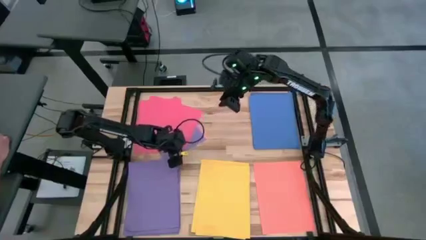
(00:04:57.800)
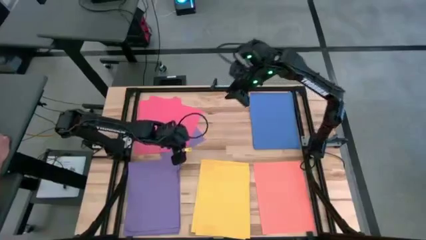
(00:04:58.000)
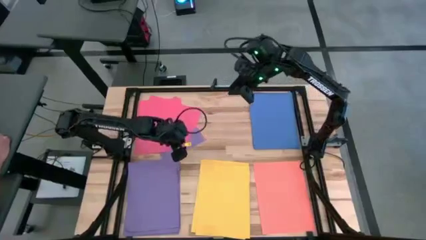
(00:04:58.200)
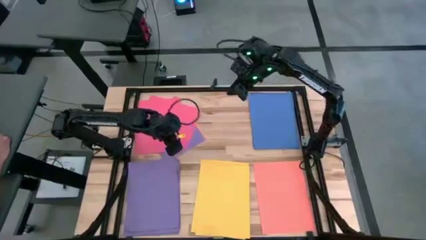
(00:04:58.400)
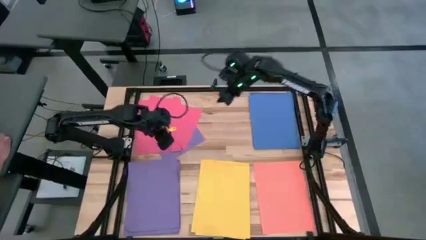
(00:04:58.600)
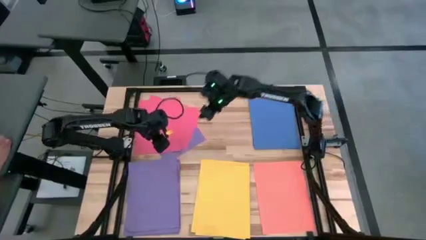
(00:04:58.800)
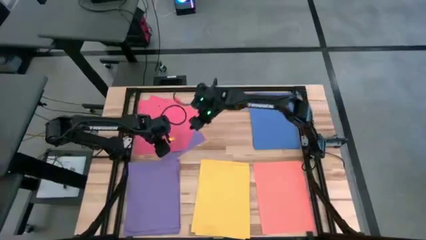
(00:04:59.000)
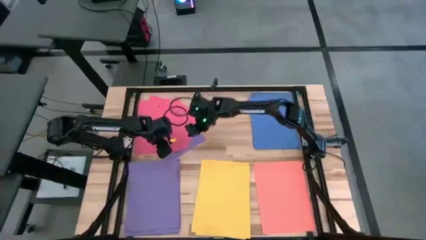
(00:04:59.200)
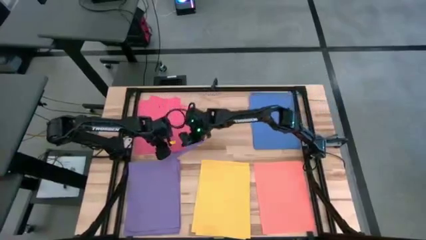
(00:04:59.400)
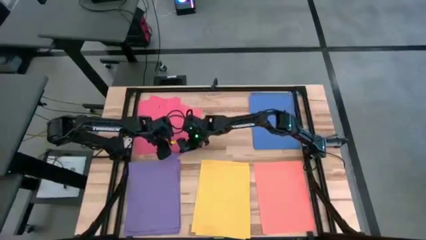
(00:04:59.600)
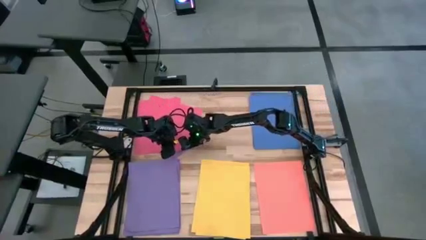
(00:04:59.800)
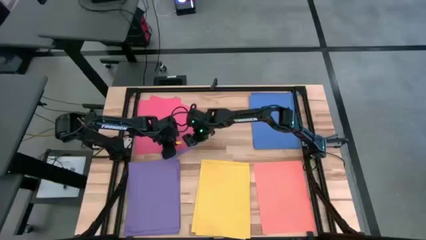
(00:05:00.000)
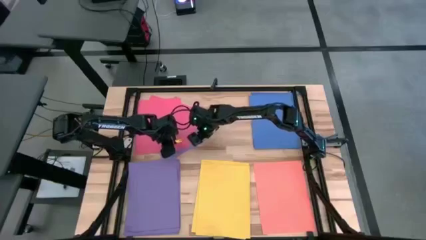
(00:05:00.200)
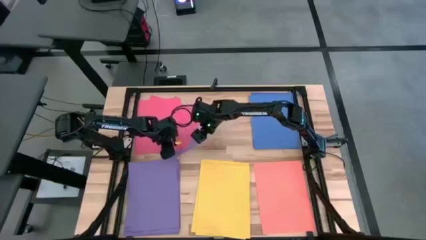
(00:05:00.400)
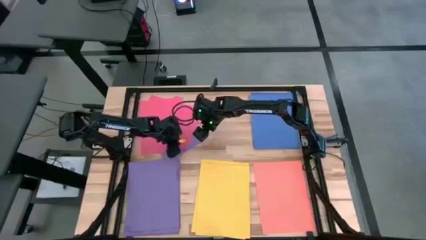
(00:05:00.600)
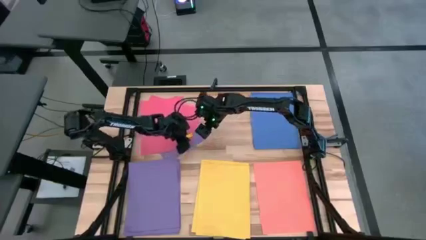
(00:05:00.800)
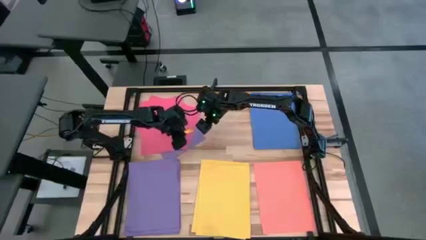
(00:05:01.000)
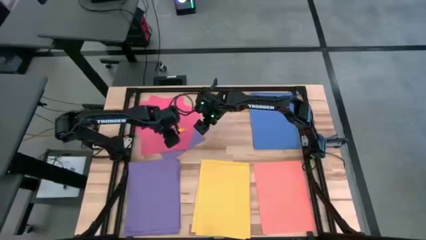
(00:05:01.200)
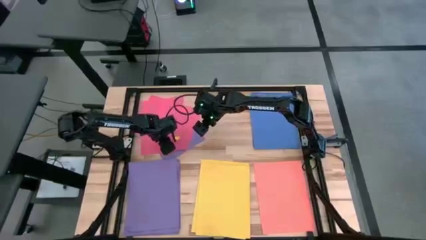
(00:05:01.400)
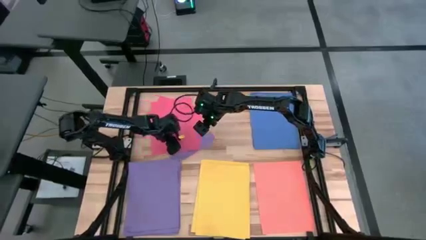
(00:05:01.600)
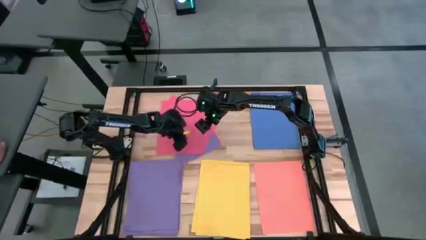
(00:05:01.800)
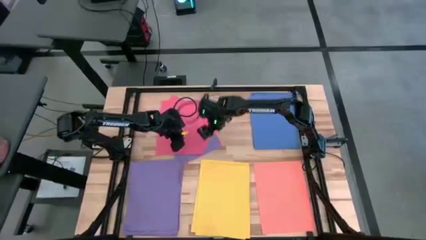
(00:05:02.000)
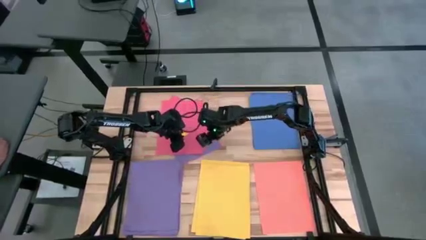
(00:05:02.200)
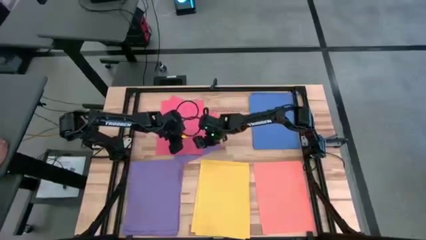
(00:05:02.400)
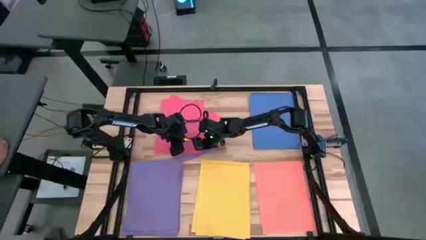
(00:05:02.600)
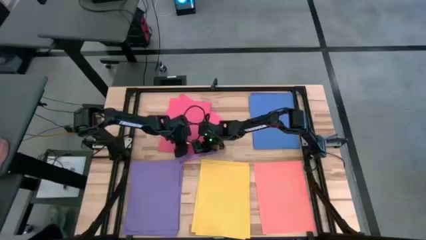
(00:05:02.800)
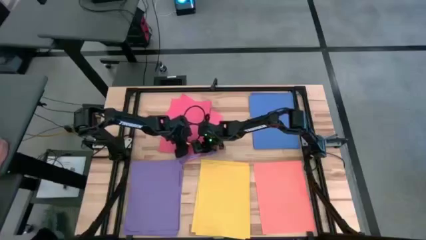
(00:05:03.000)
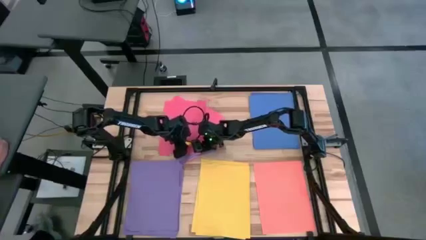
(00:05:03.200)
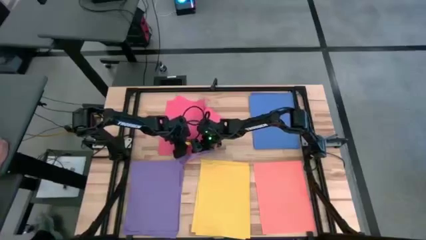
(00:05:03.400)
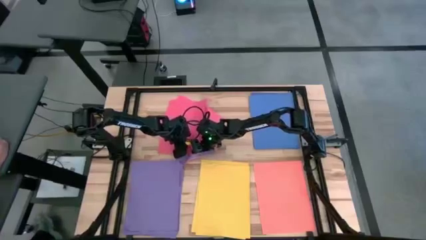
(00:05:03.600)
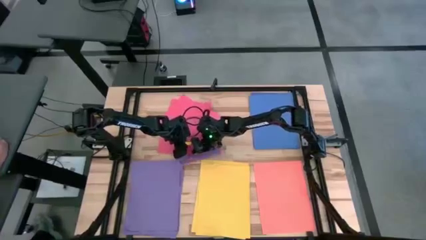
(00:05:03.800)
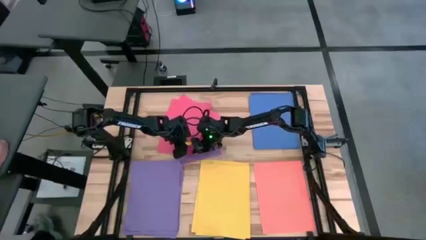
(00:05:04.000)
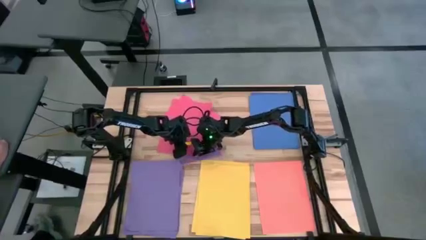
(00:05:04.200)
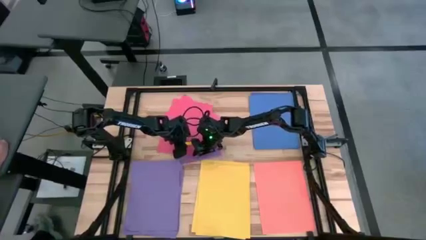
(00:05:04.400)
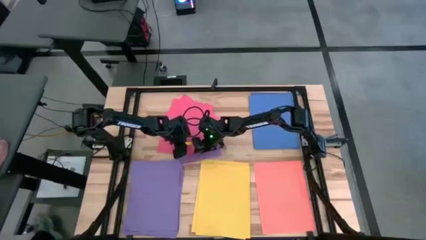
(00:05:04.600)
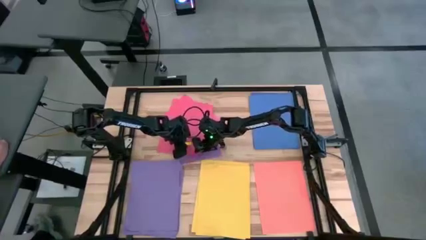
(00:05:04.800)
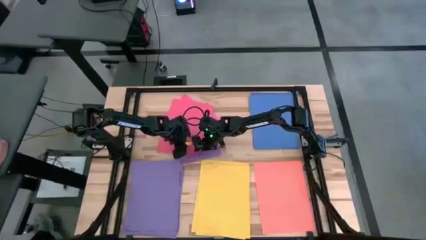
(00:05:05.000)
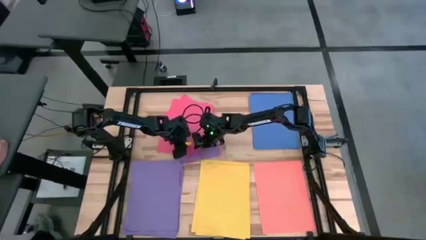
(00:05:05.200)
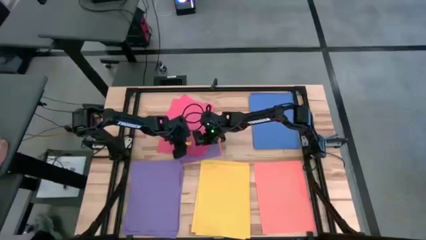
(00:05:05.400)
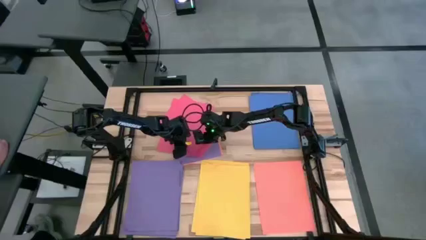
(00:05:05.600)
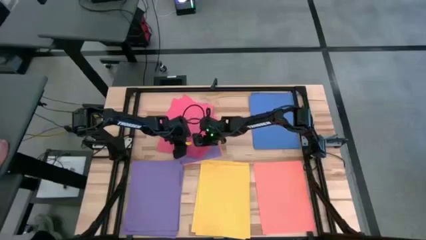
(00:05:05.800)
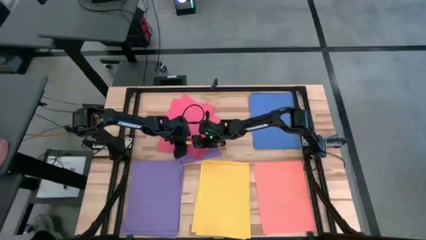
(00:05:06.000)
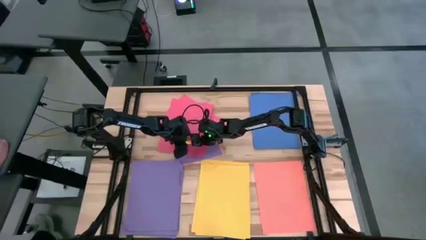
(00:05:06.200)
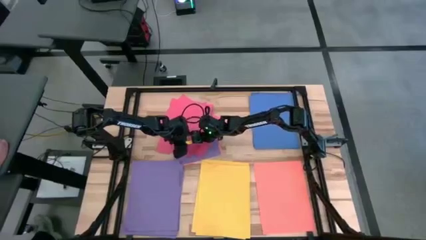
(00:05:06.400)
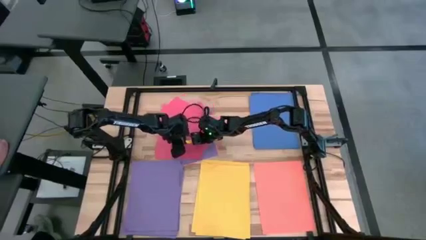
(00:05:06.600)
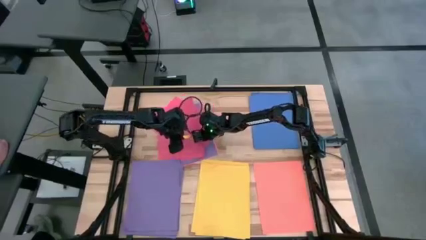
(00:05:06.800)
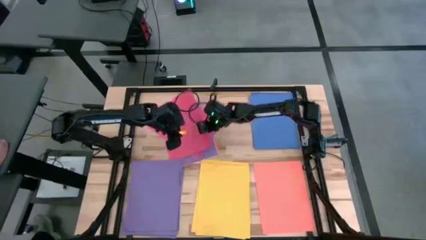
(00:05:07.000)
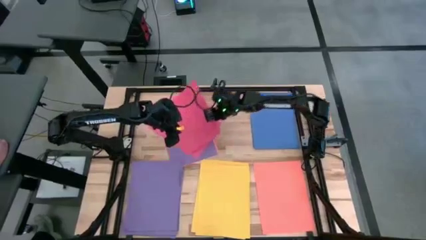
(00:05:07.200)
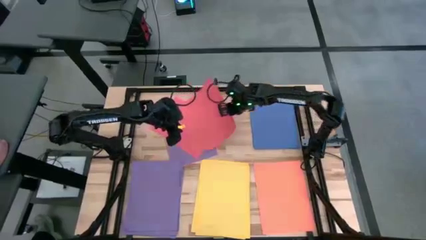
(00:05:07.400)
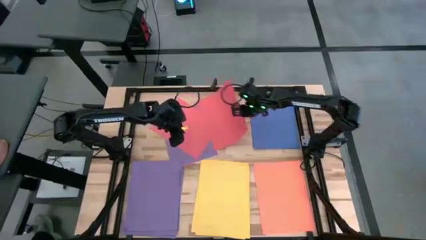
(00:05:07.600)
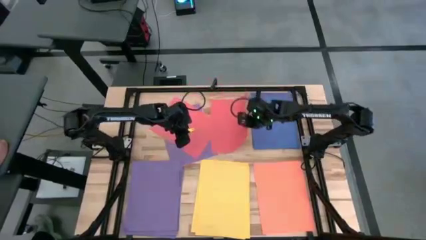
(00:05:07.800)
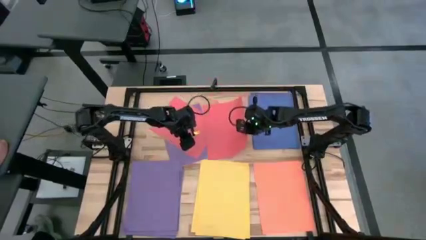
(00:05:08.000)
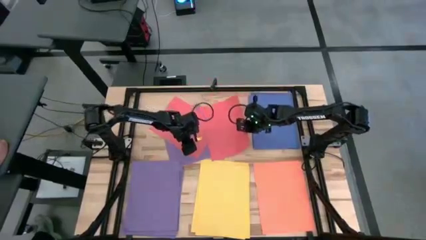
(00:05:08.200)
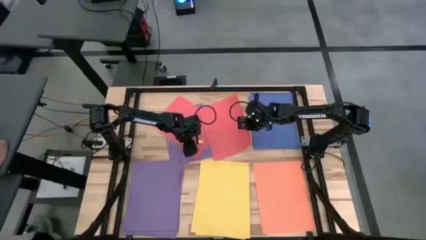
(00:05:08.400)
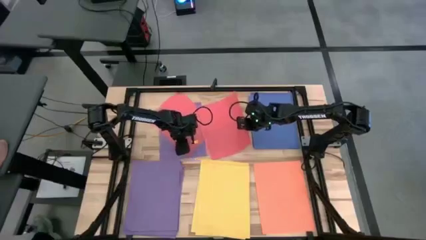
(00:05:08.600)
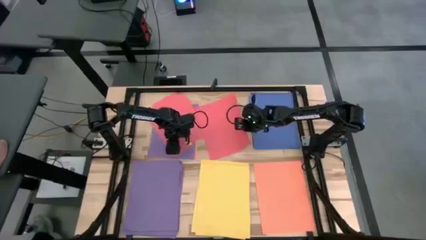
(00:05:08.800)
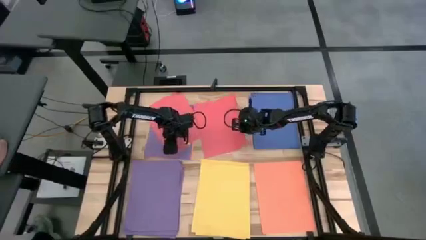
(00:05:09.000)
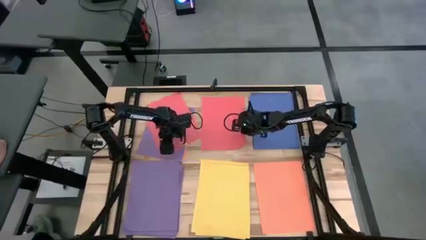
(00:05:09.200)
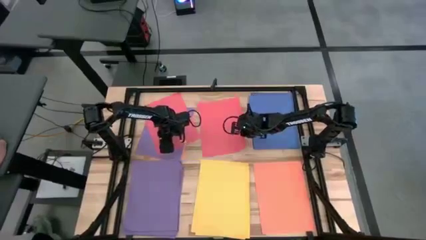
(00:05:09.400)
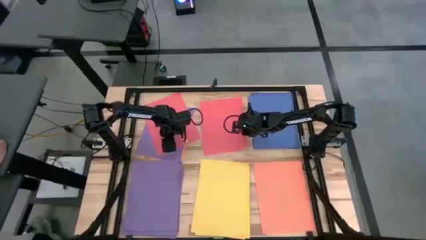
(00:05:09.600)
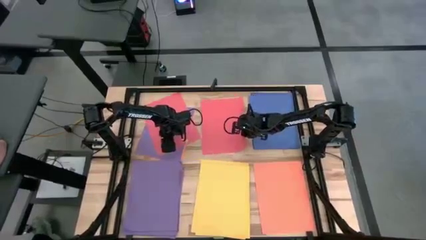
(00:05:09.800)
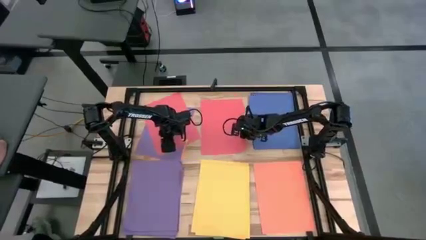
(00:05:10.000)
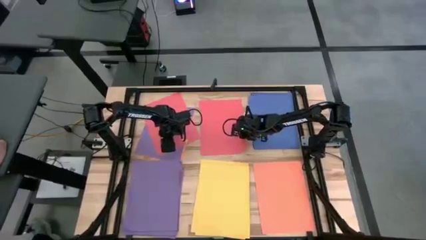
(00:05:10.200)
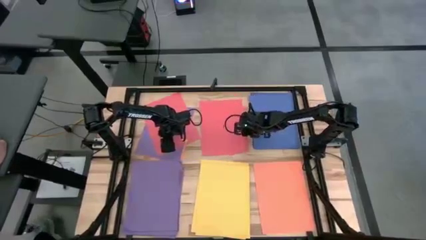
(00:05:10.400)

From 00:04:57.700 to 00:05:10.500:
Task: Organize paper
Put the pink paper to the top center of the table
